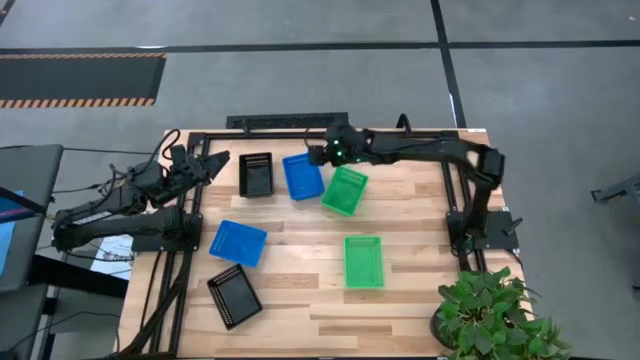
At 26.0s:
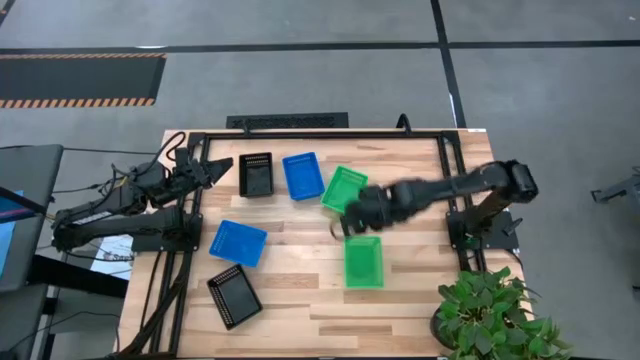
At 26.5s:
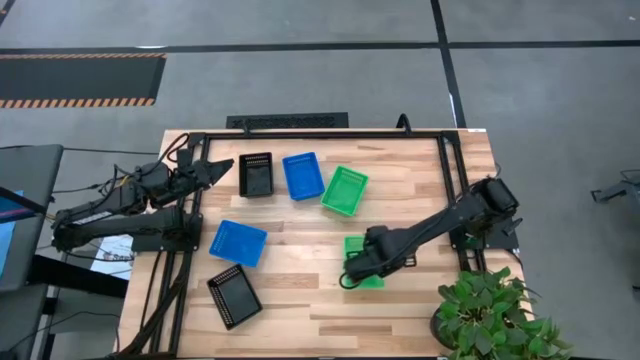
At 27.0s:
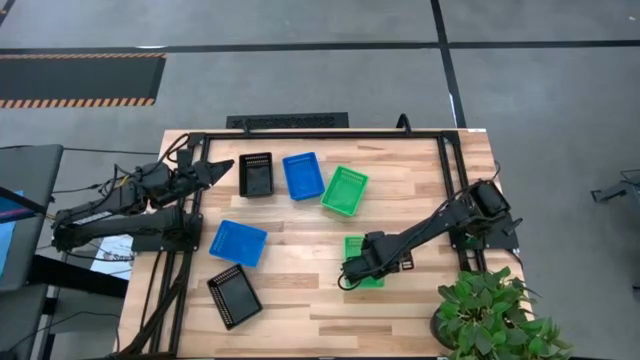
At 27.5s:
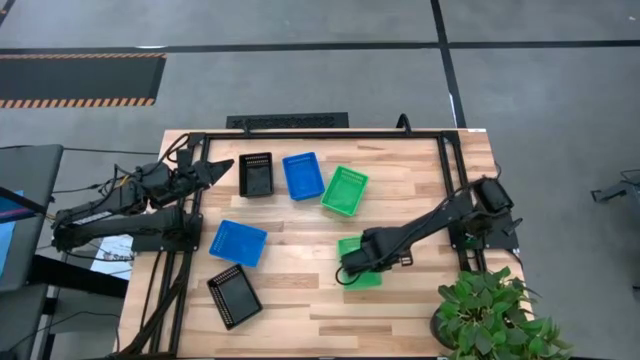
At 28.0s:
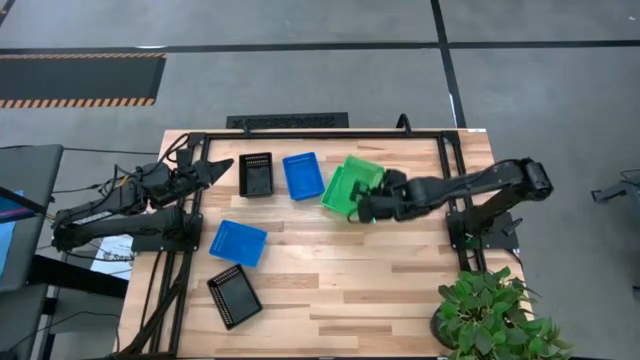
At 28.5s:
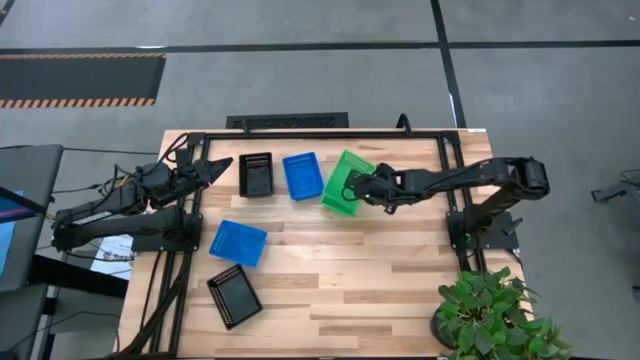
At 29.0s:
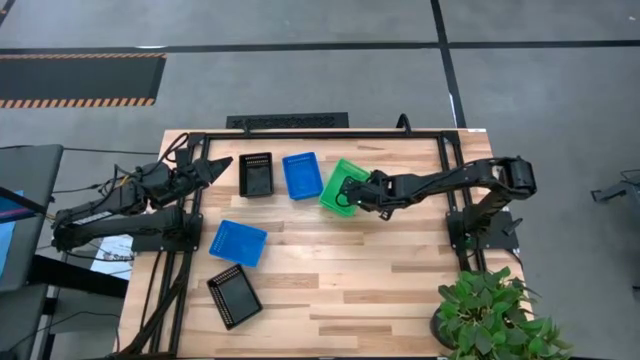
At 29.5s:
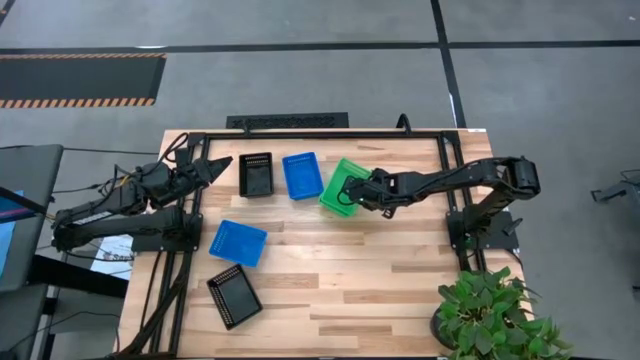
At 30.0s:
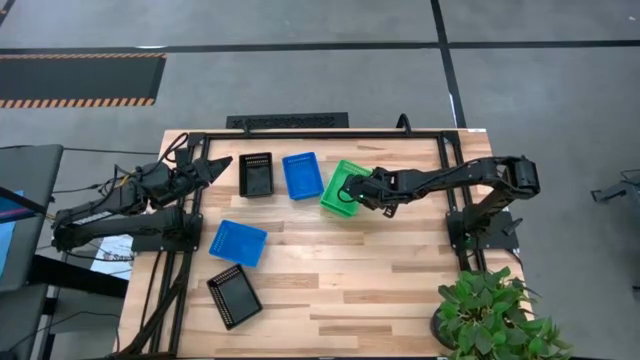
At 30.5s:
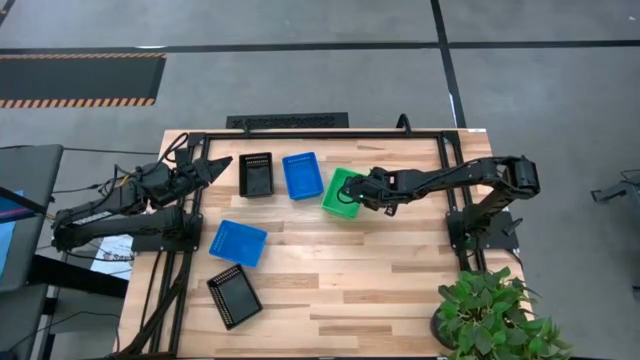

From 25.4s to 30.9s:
Stack the bottom green bin on top of the top green bins

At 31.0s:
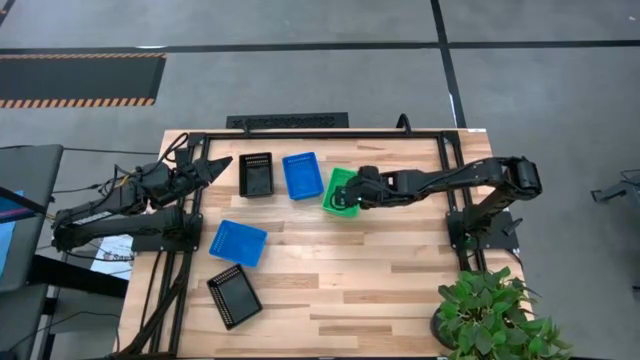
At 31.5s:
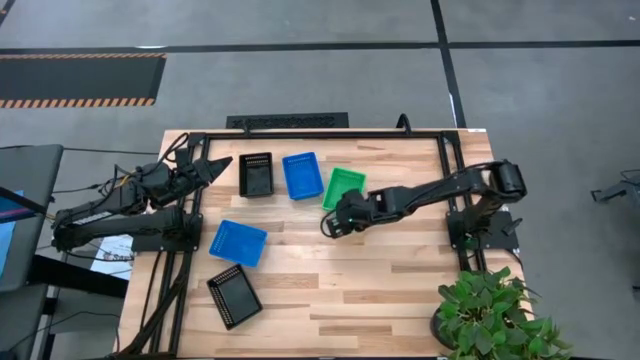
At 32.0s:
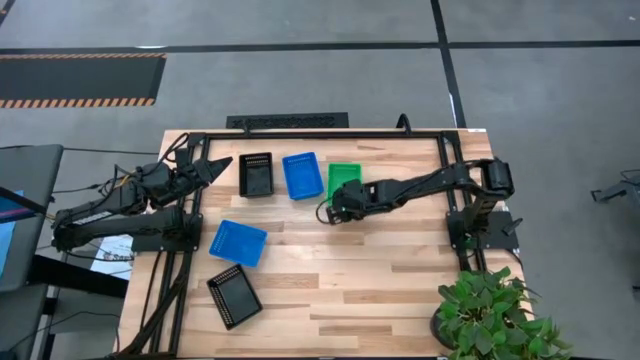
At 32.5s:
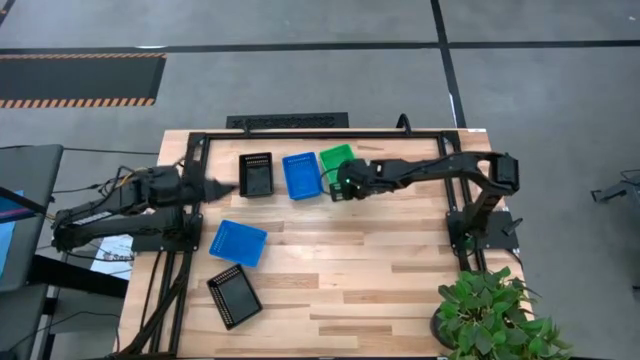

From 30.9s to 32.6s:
Adjust the stacked green bins to align the position

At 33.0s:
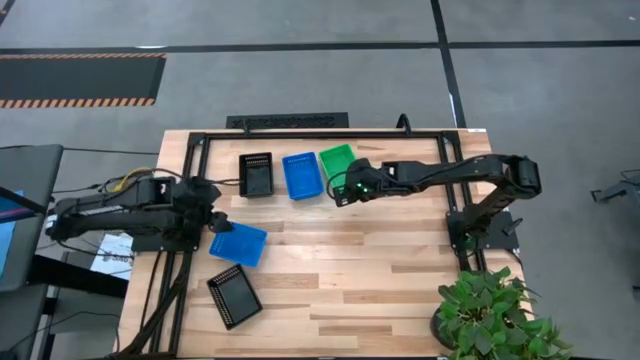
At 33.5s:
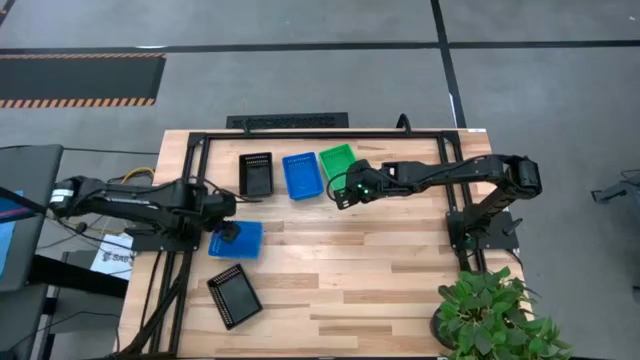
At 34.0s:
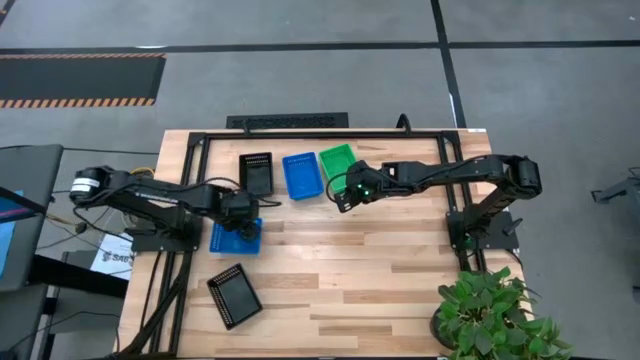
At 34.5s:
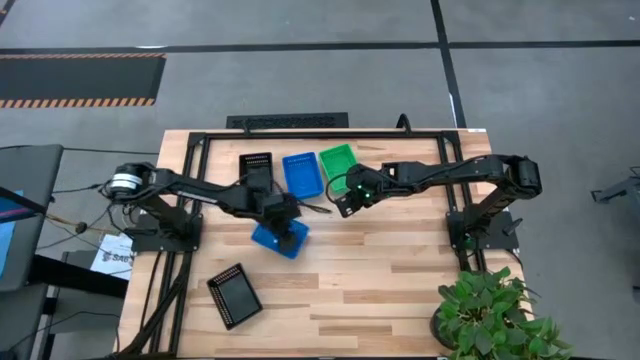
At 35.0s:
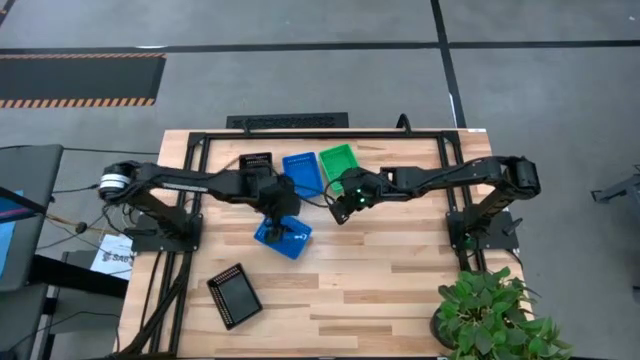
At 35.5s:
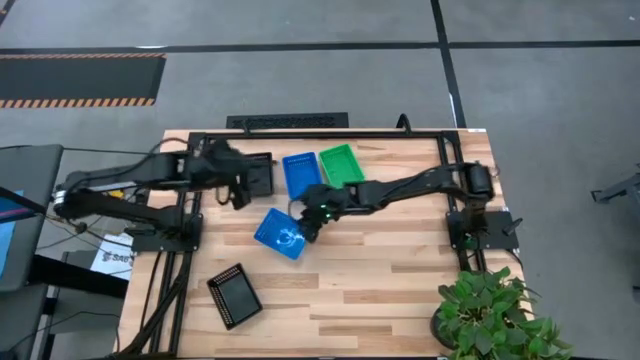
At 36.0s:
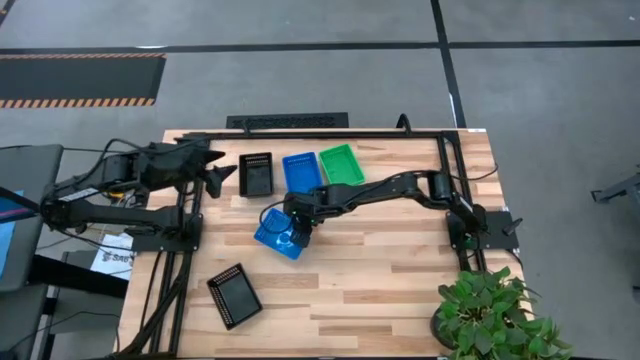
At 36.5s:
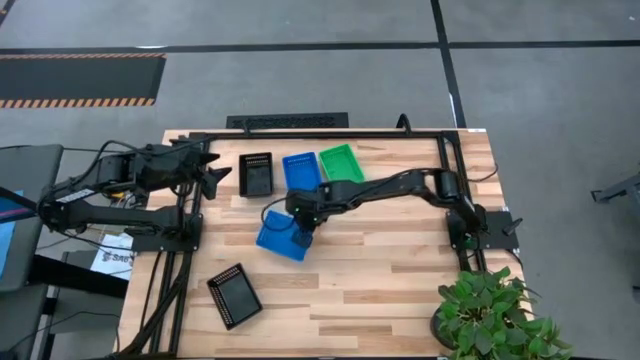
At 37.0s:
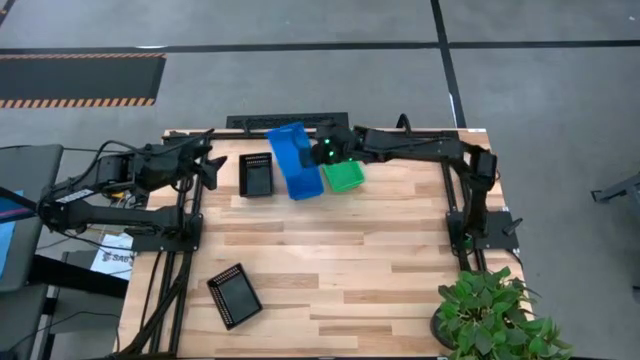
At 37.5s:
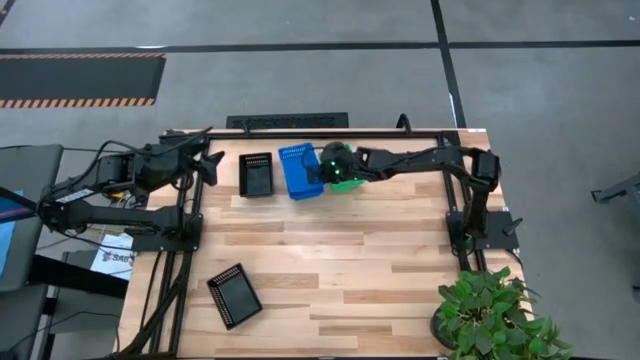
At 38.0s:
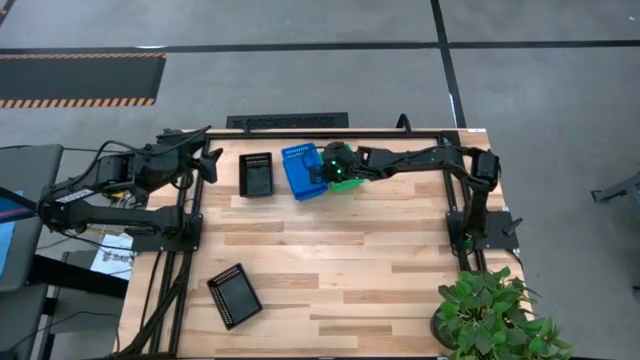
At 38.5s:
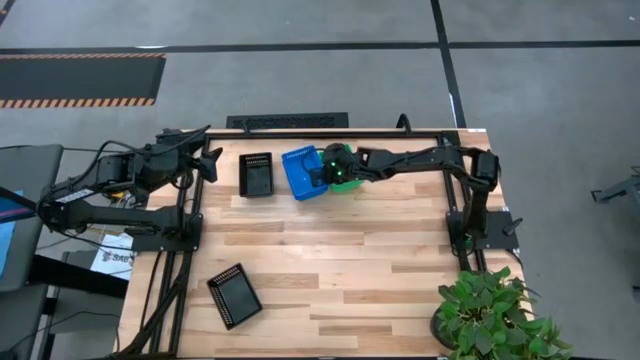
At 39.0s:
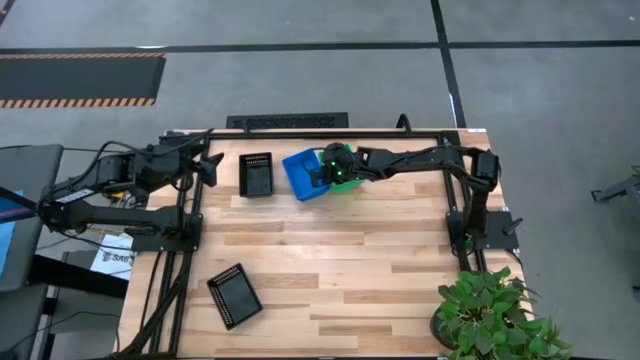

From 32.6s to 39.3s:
Stack the bottom blue bin on top of the top blue bins

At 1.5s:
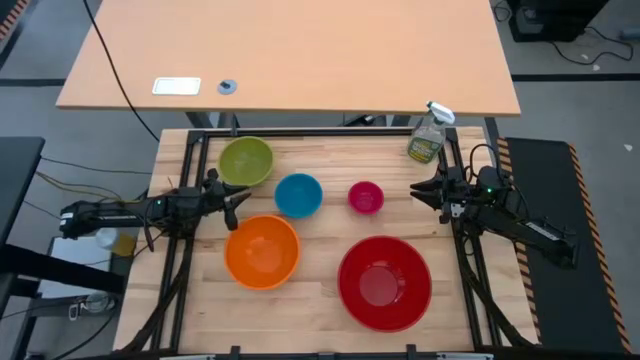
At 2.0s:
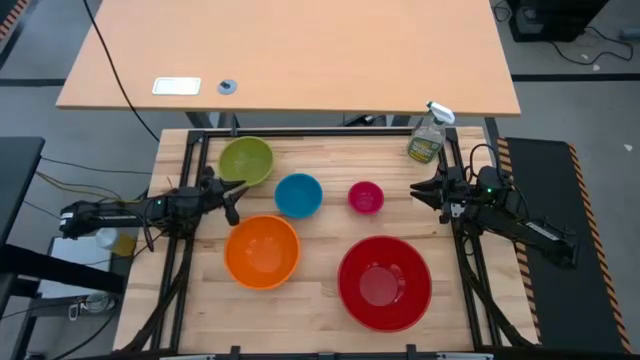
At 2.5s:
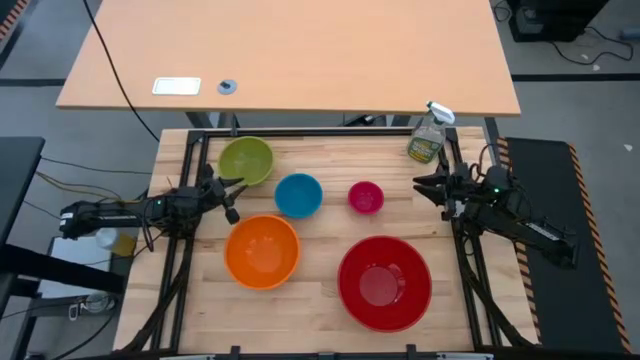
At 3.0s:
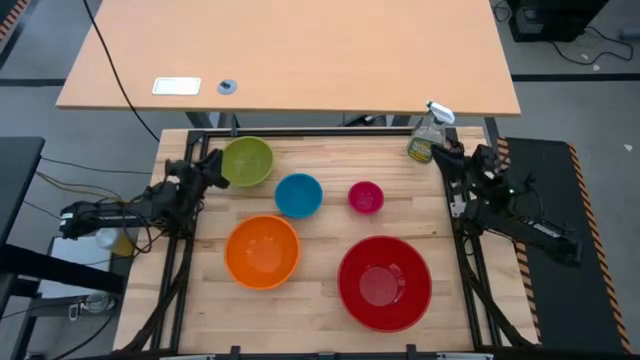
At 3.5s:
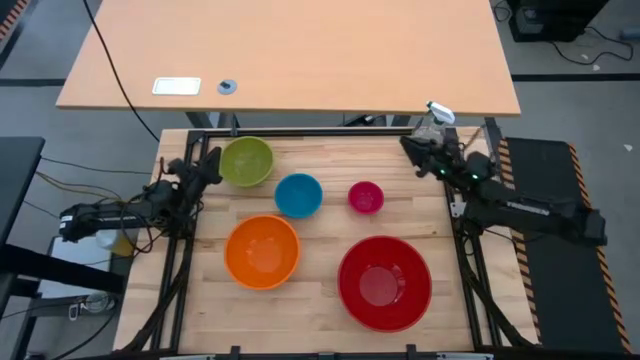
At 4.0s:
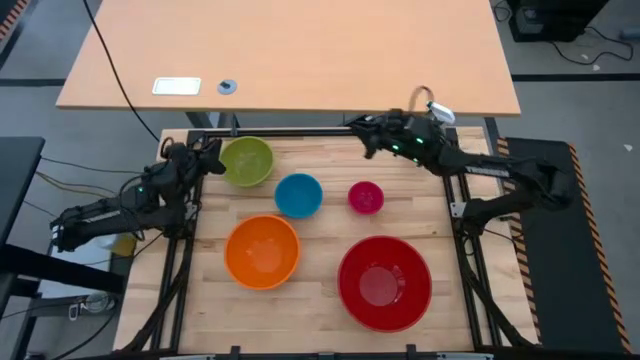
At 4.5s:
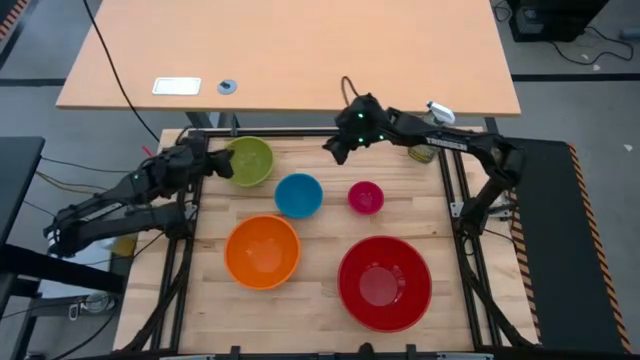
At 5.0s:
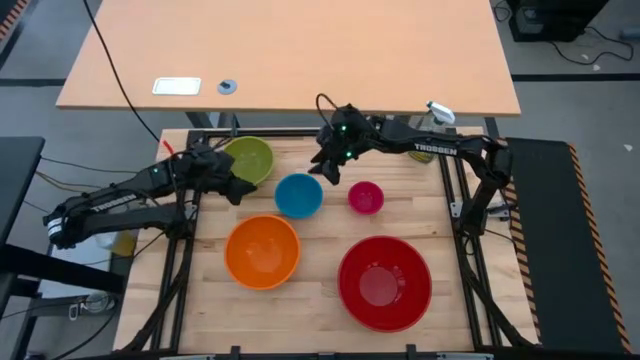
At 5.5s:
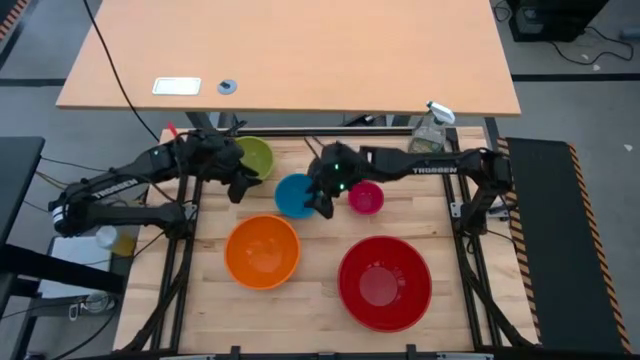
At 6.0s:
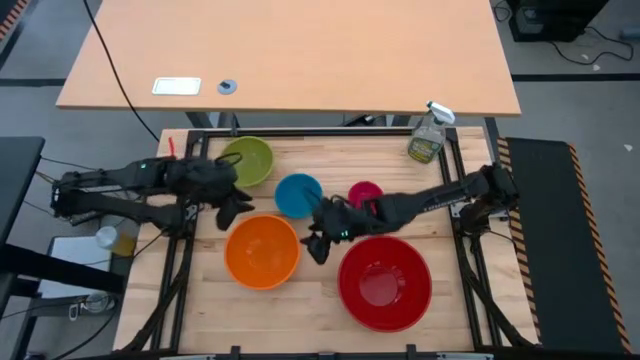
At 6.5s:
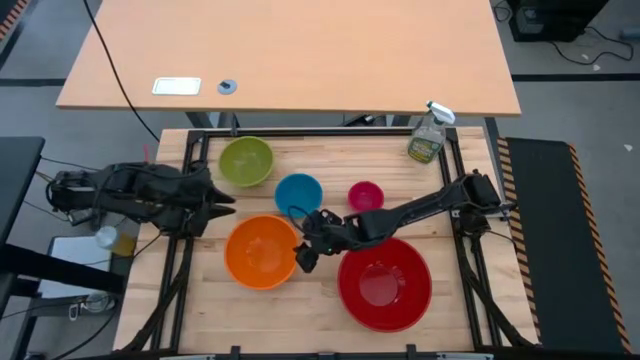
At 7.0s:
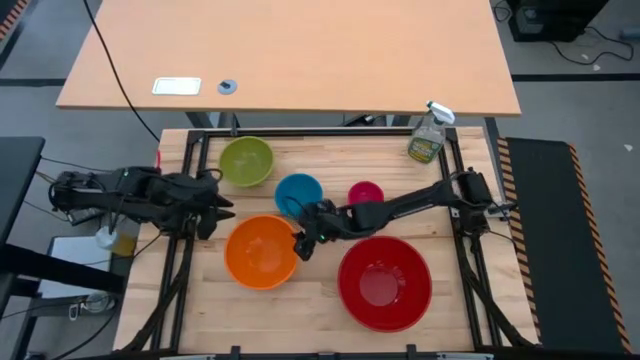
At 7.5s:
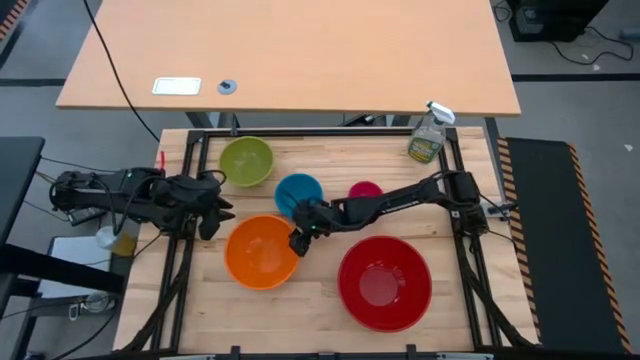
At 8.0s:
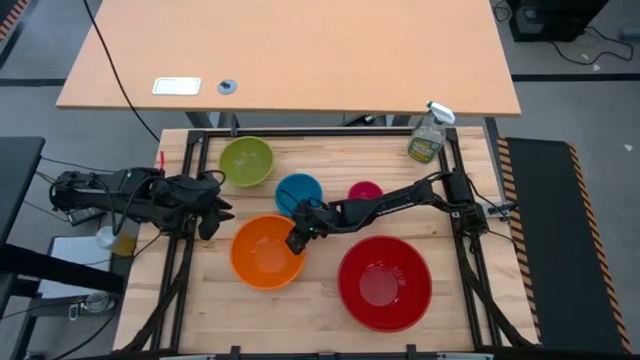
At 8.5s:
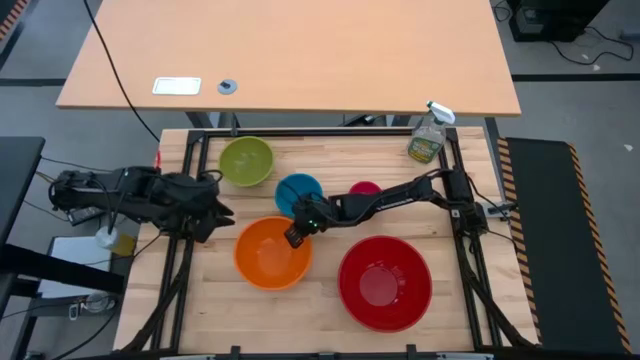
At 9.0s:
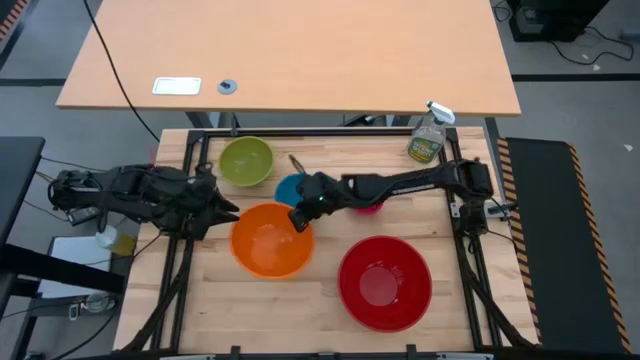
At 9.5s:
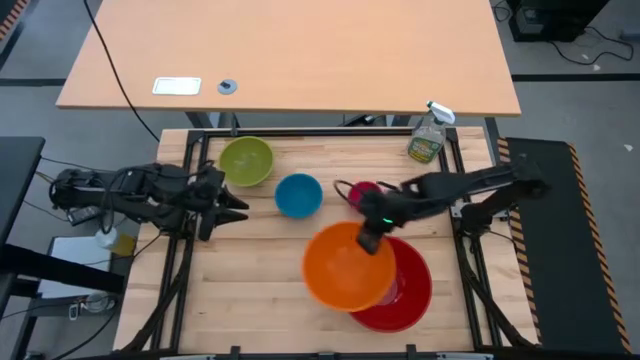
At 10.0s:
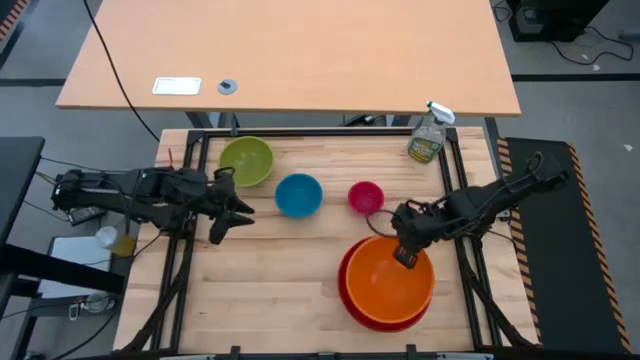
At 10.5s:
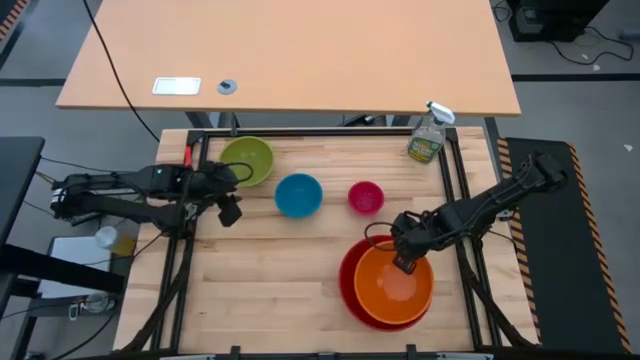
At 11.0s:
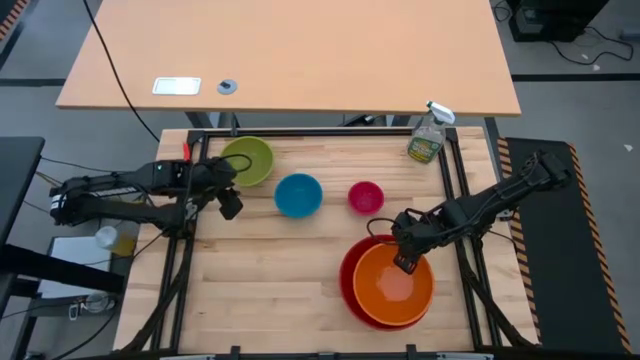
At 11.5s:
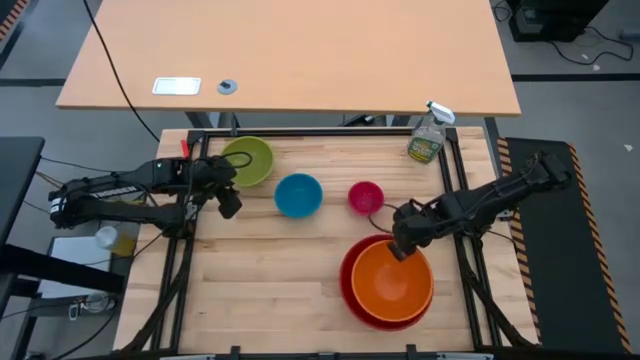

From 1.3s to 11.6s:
Stack the orange bowl on top of the red bowl
